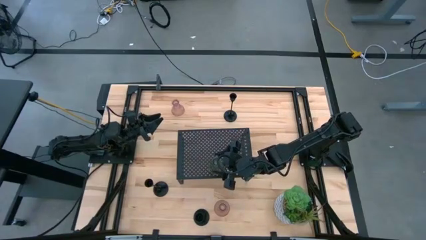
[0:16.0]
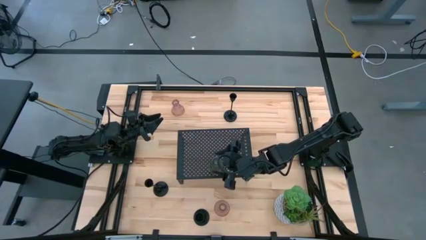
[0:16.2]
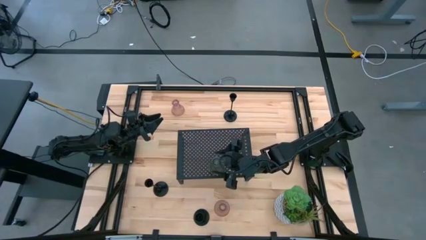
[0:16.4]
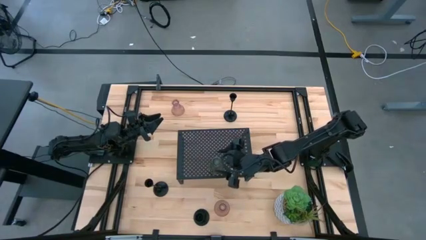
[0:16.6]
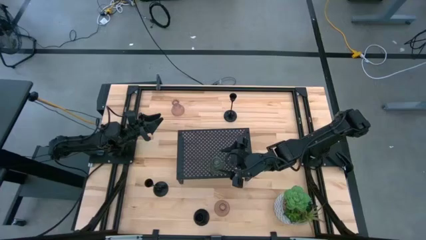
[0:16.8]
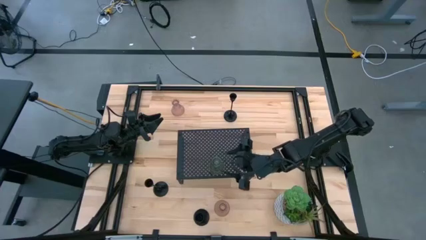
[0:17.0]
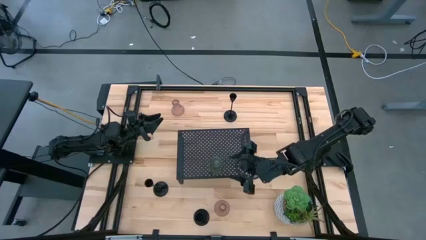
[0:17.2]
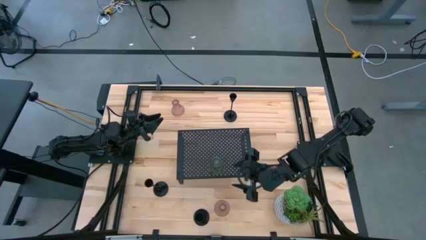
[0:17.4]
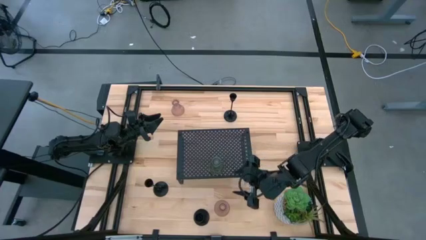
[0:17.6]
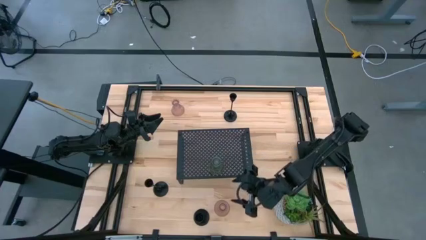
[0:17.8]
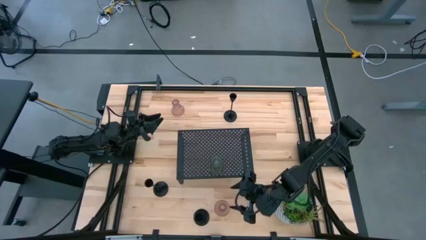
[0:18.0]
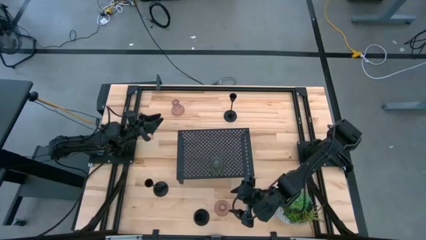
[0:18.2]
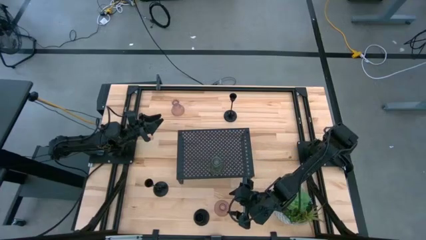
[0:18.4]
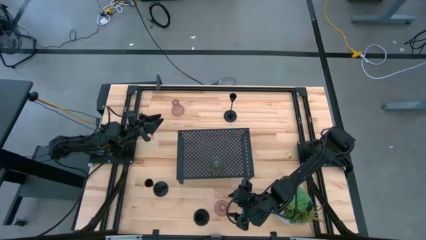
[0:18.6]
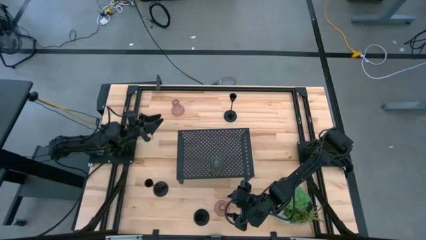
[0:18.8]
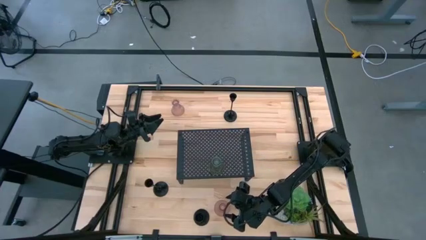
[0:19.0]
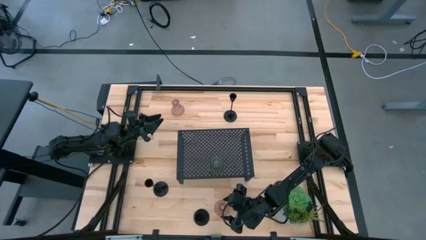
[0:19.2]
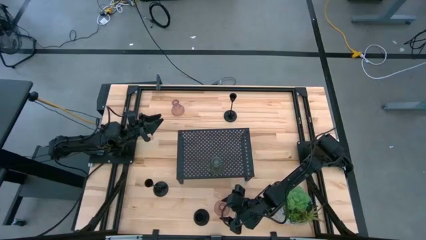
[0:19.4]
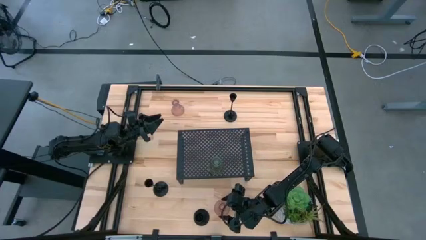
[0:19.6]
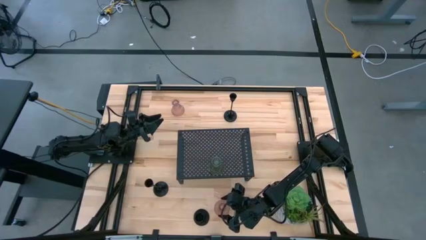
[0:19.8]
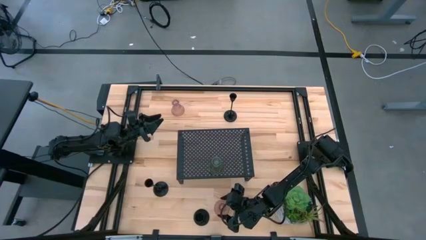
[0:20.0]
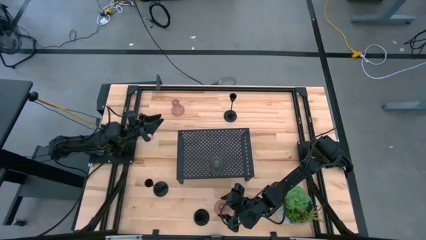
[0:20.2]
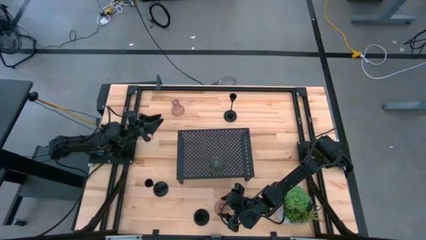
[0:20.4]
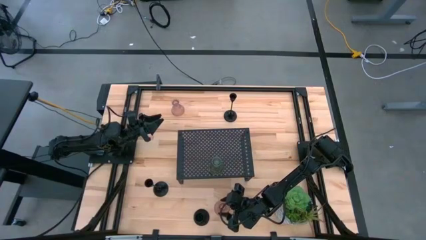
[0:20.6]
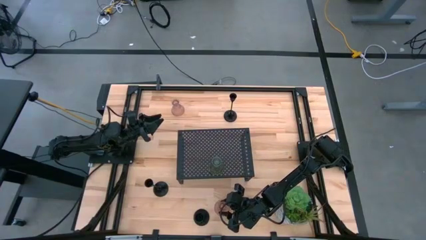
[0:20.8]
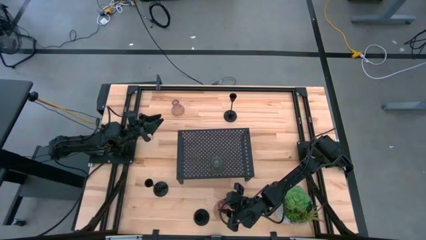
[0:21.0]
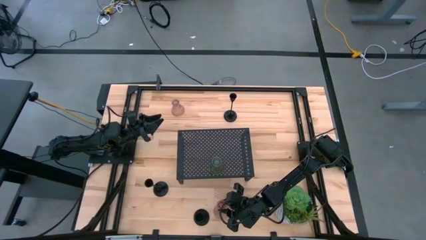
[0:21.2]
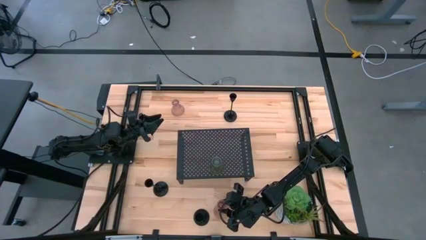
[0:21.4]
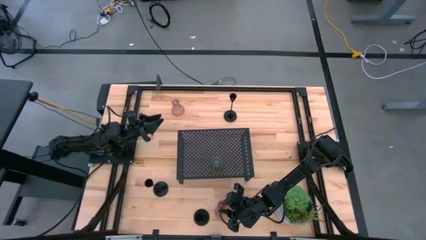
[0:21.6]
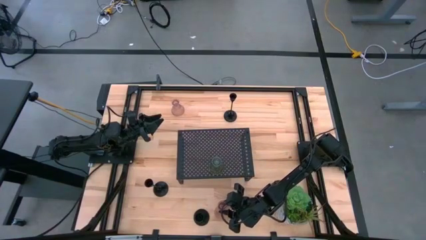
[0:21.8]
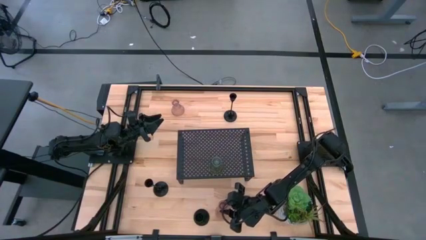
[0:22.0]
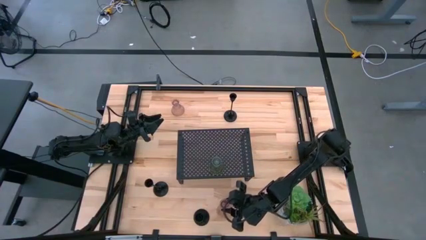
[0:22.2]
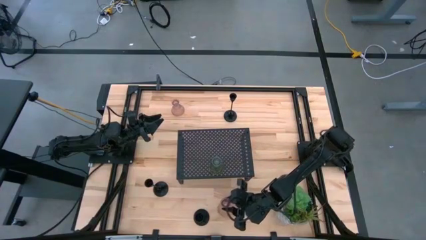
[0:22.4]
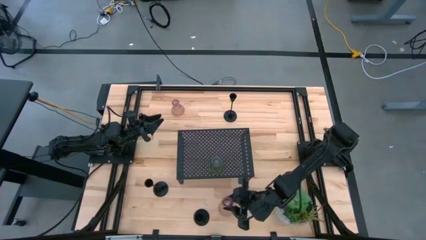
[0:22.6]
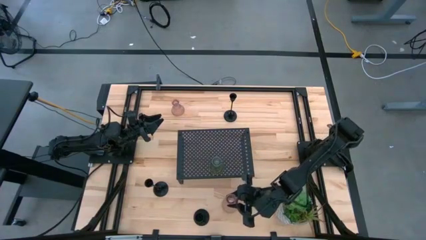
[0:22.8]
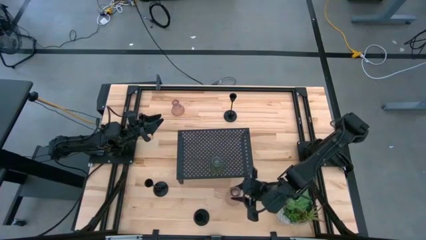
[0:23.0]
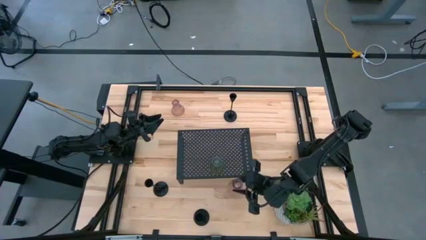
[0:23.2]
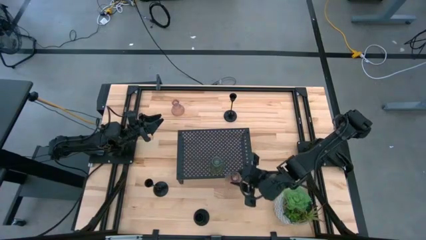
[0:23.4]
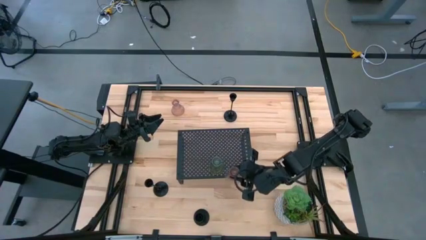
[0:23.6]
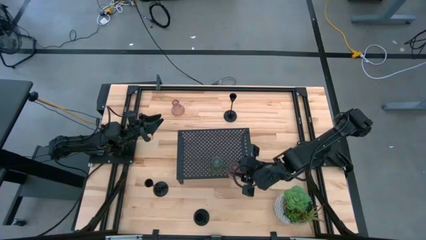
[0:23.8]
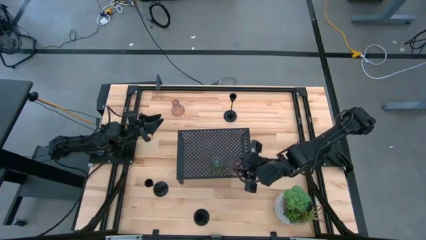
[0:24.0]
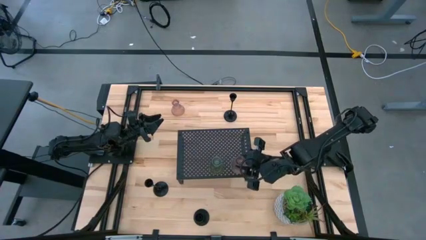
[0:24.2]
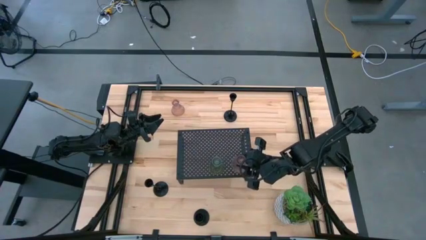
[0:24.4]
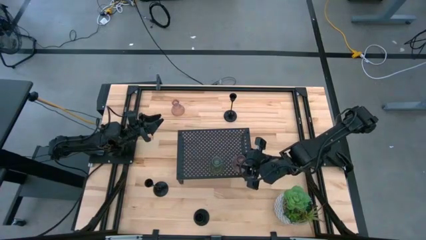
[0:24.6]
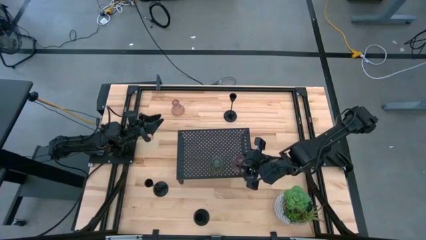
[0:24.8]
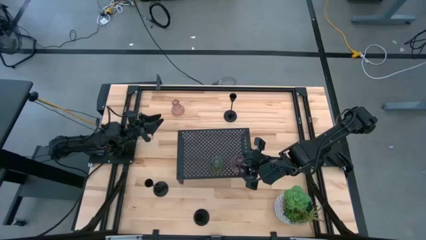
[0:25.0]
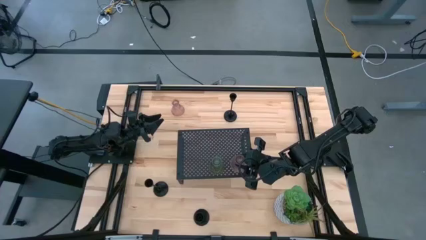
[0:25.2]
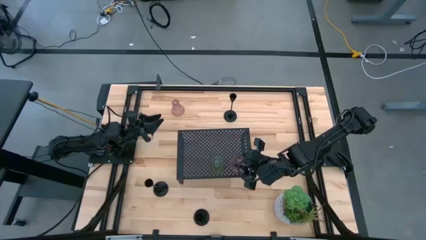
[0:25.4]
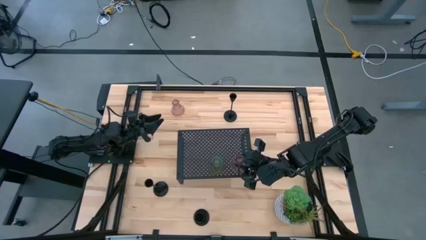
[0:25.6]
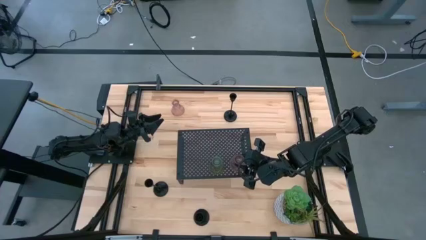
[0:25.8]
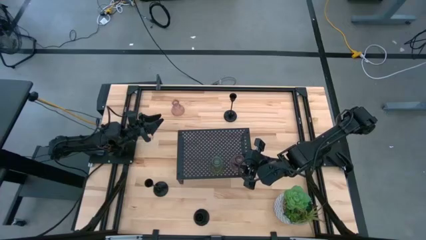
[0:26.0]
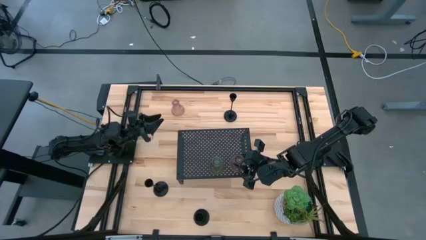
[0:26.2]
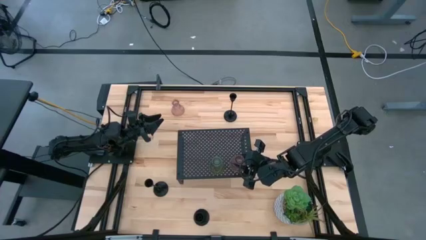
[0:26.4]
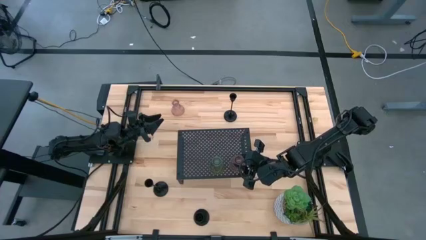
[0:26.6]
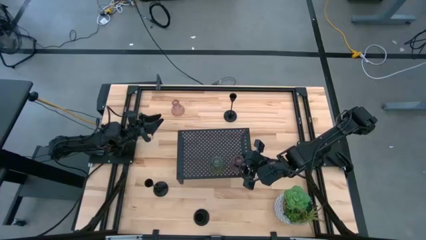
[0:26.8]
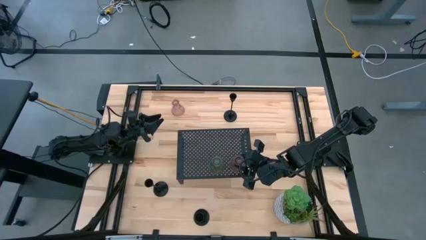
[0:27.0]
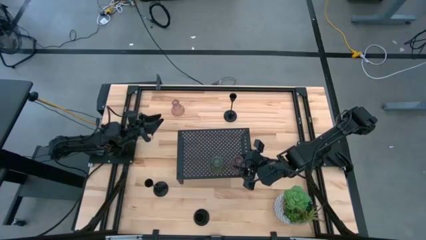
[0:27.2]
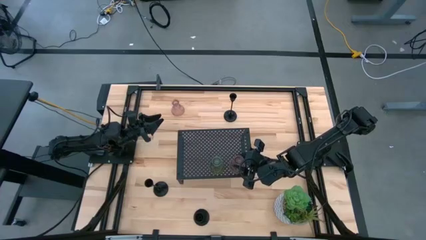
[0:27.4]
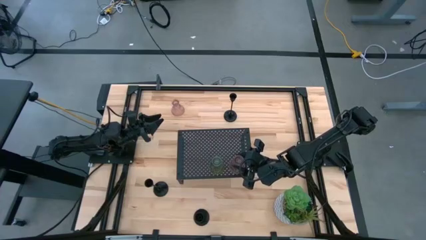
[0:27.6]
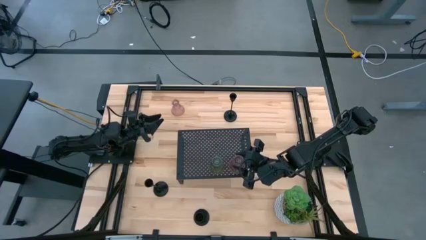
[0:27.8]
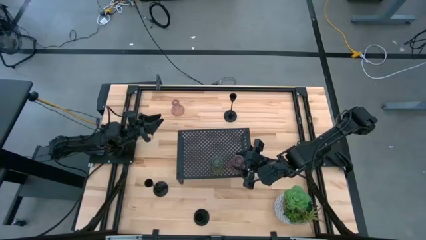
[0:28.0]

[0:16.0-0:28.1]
Task: Pick & Place candle stick holders
Align the bottom purple candle holder on the shelf with the green candle holder
